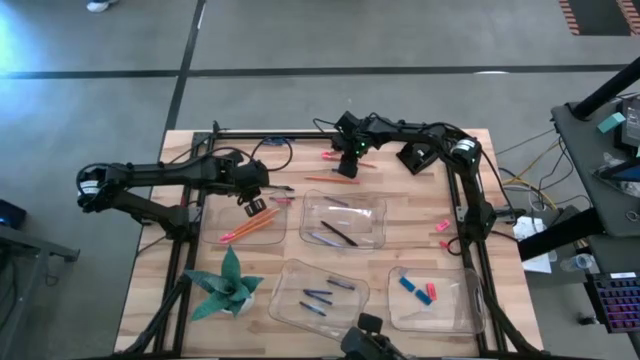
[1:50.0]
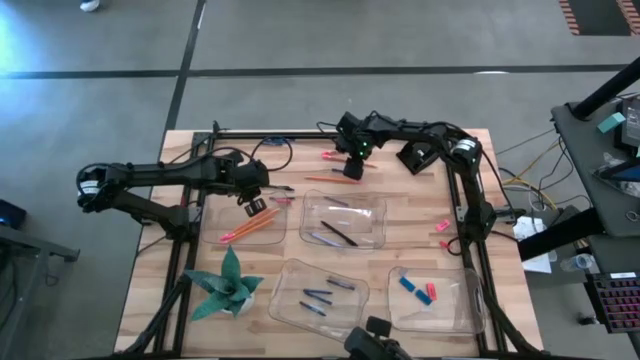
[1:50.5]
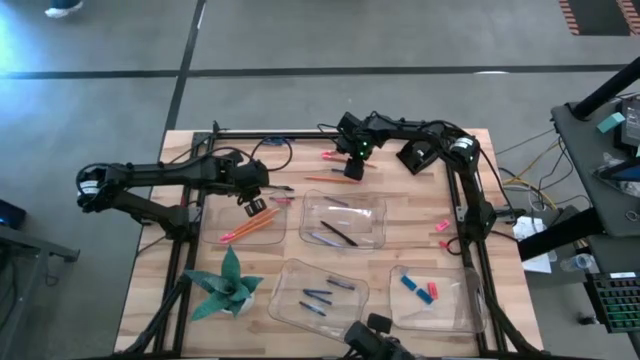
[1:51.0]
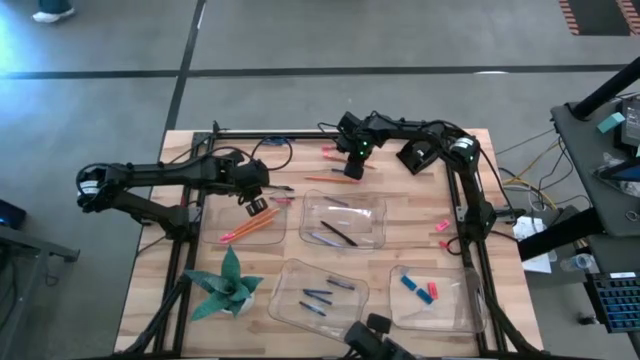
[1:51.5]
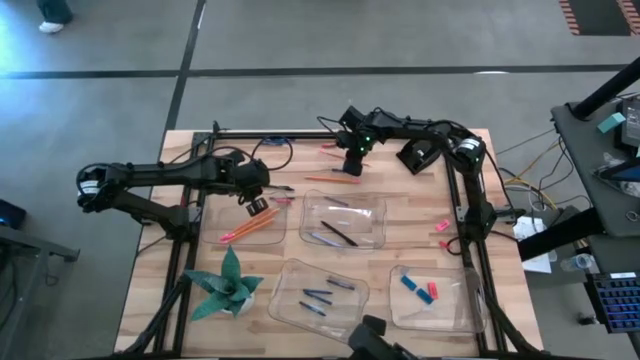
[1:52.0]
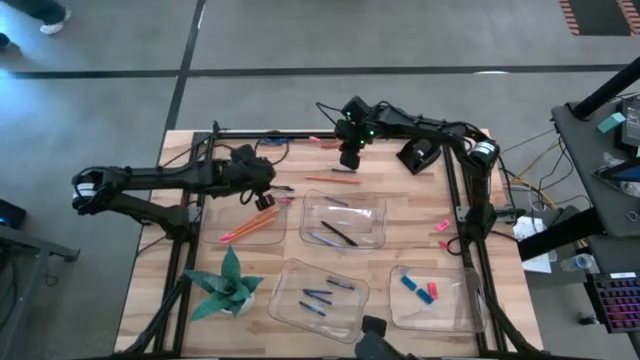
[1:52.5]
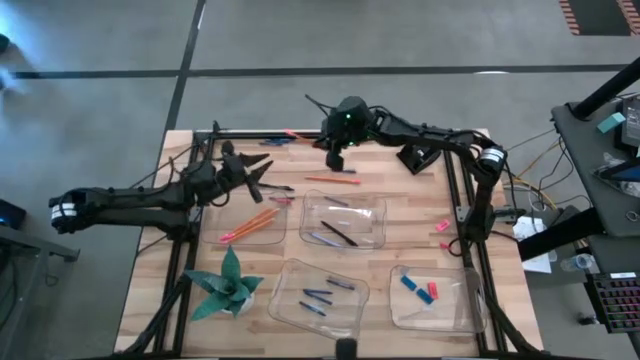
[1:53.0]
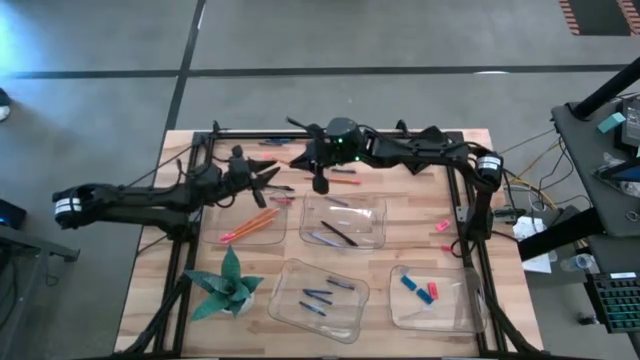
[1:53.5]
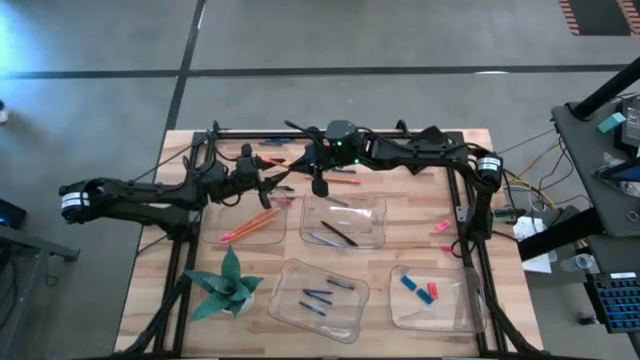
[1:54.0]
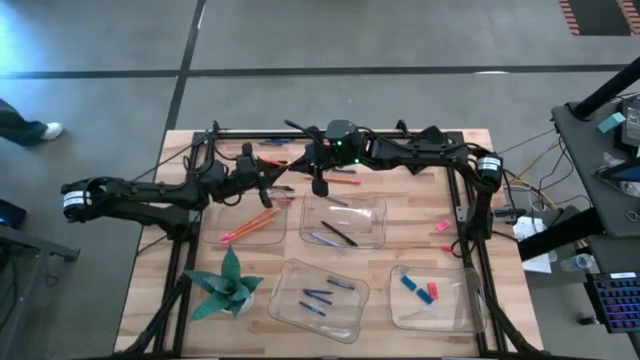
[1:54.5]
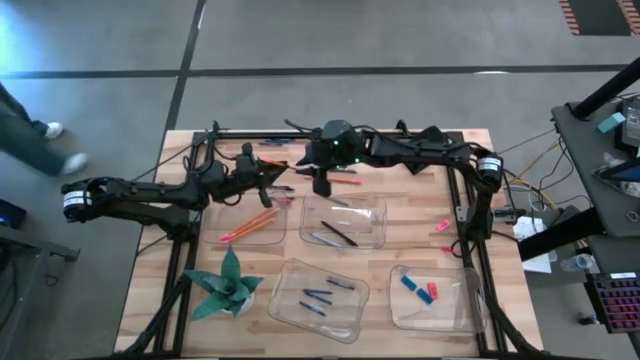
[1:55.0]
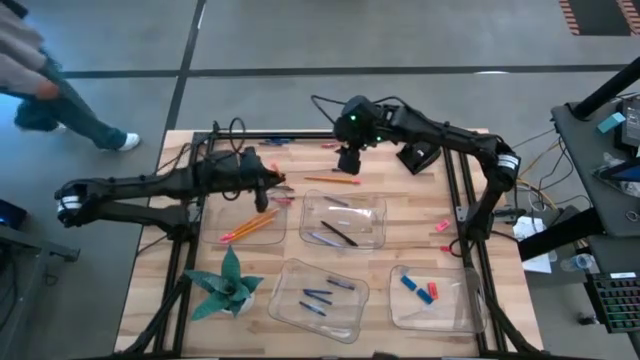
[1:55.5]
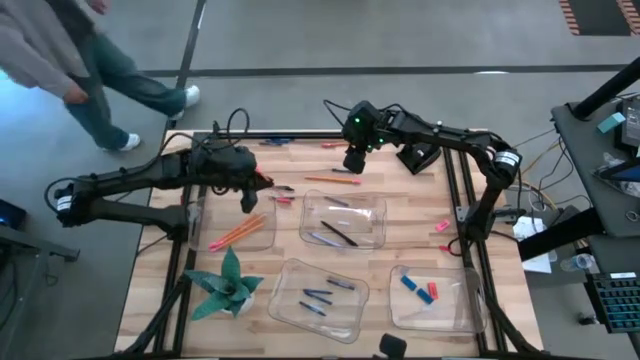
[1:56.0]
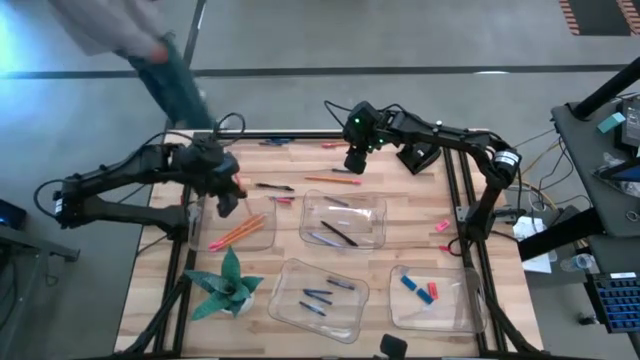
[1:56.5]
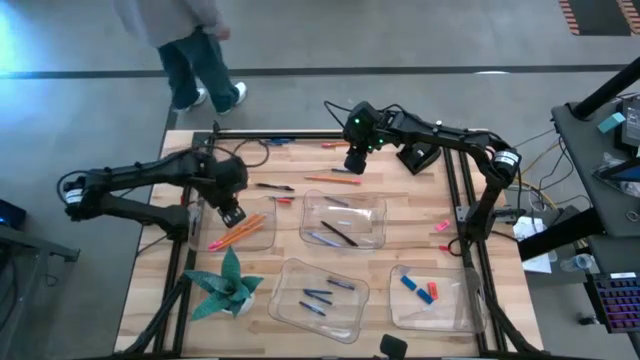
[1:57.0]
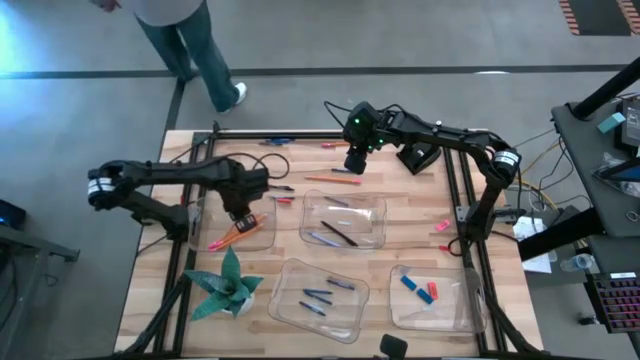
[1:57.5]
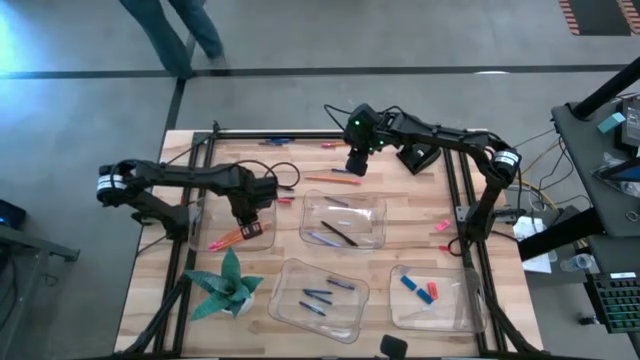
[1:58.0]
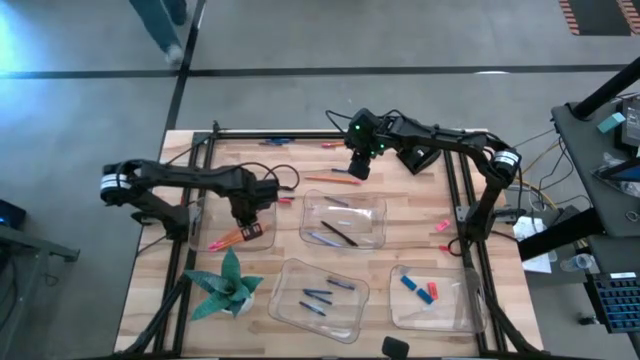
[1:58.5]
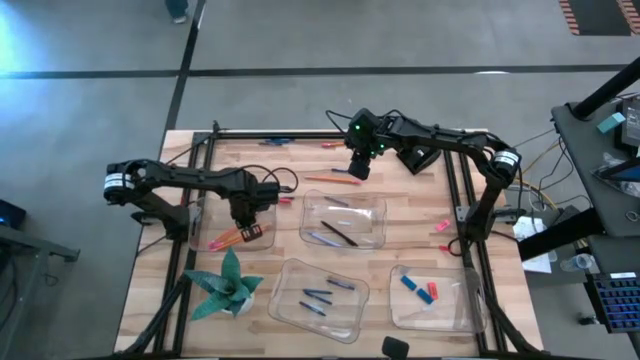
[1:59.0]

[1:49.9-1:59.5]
Task: Sort crayons/erasers/pens/pencils in bins
Put the orange pencil into the top left transparent bin

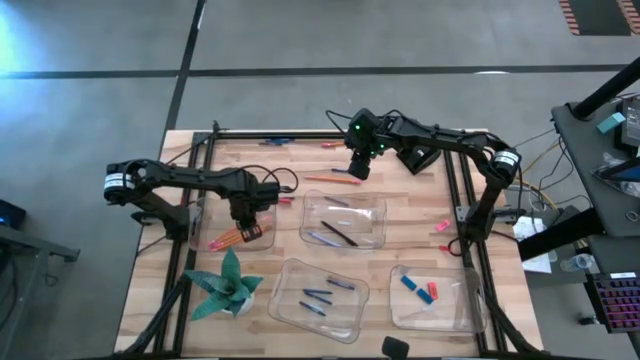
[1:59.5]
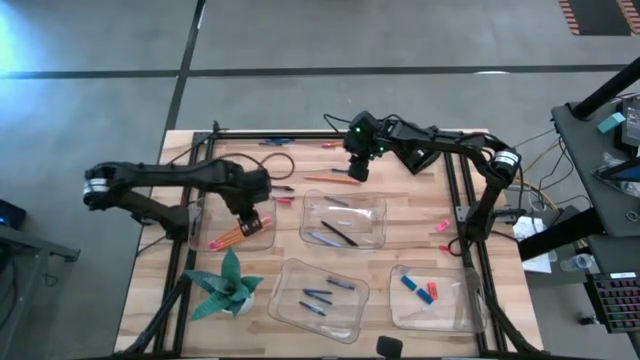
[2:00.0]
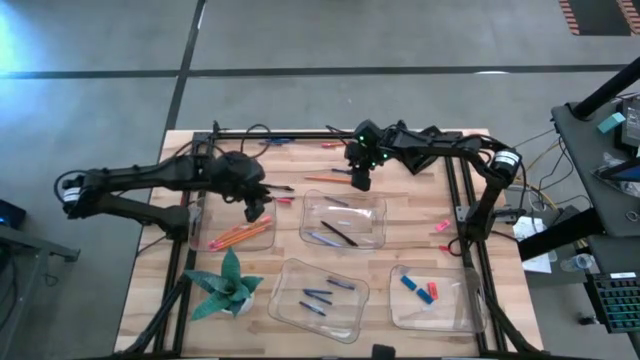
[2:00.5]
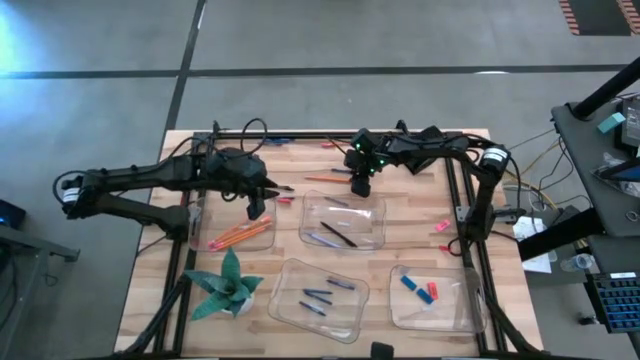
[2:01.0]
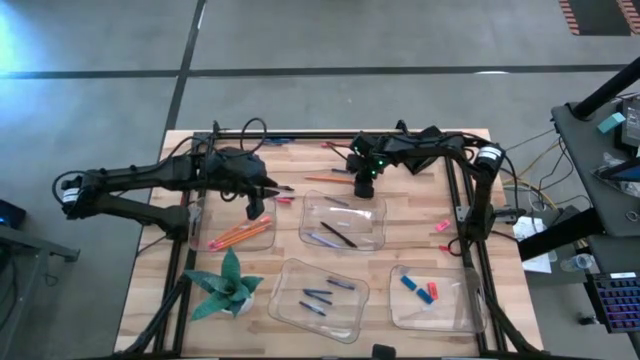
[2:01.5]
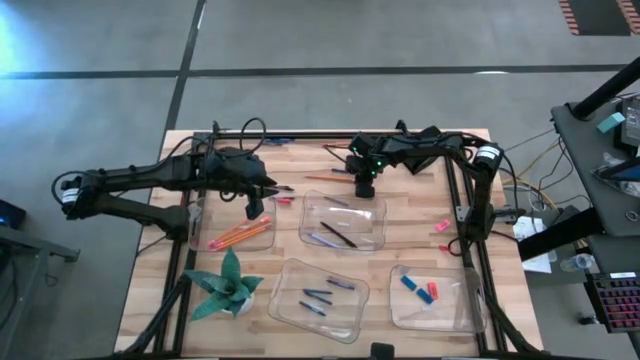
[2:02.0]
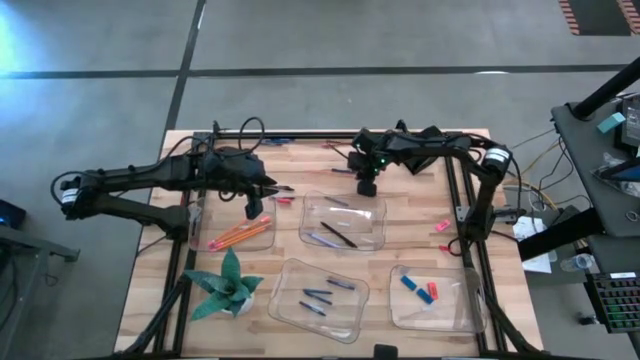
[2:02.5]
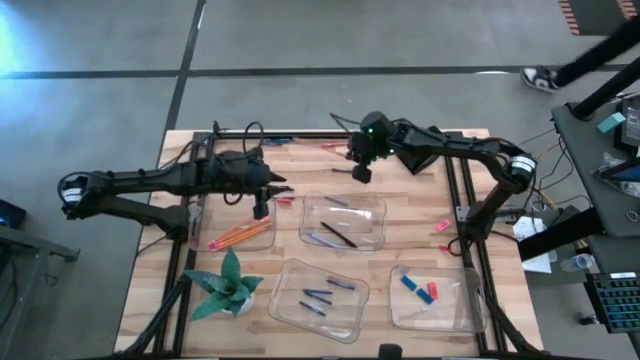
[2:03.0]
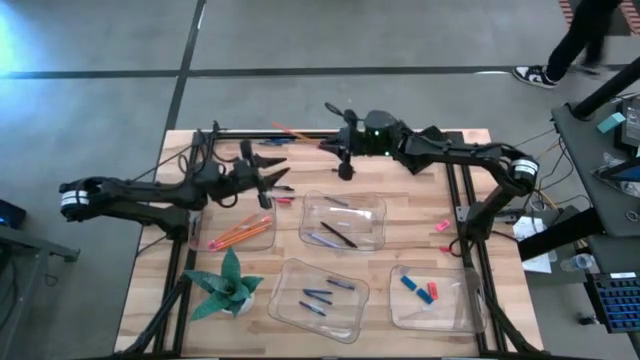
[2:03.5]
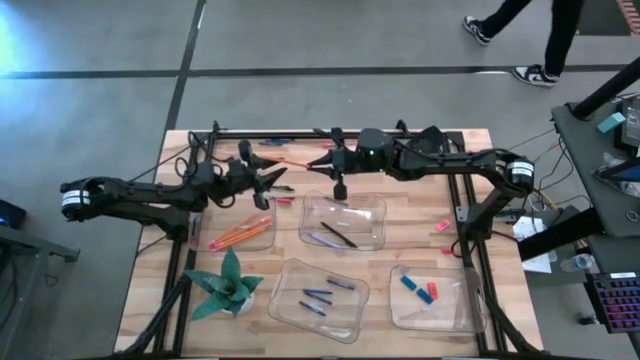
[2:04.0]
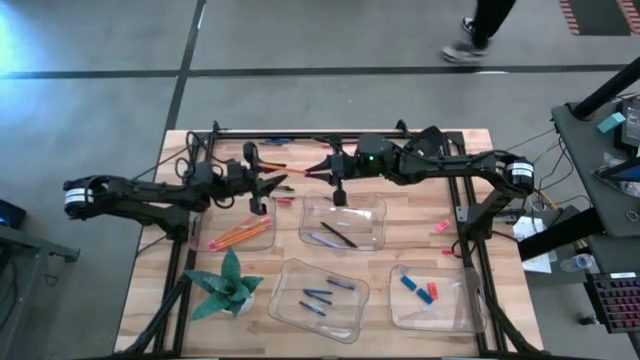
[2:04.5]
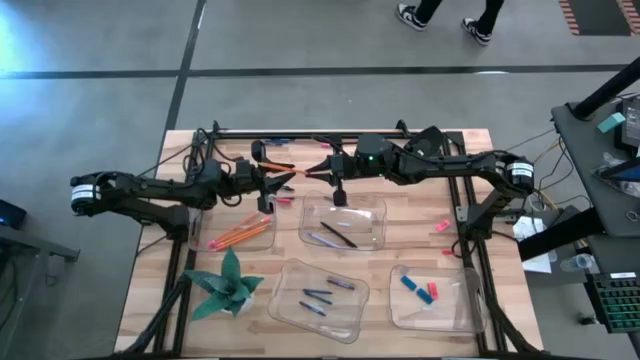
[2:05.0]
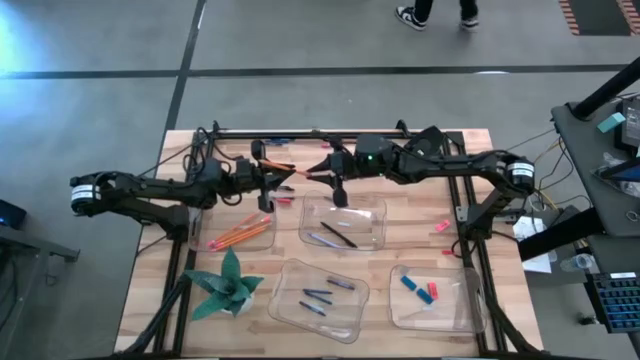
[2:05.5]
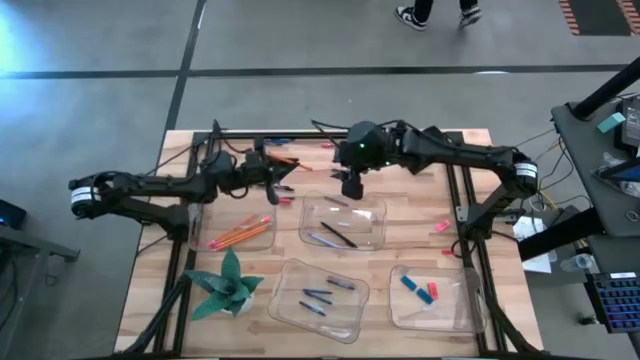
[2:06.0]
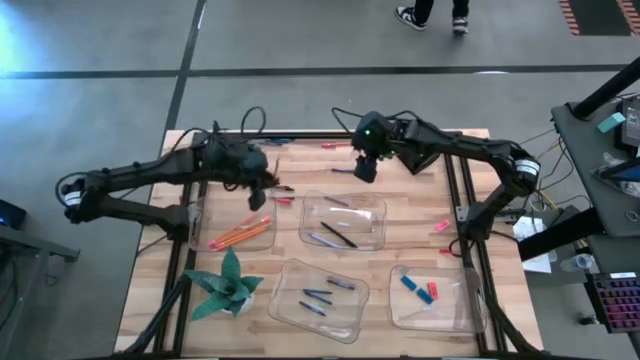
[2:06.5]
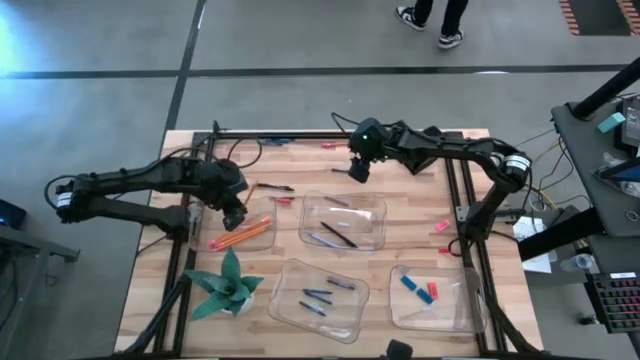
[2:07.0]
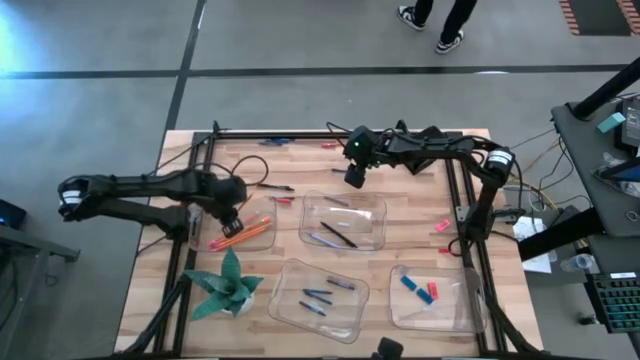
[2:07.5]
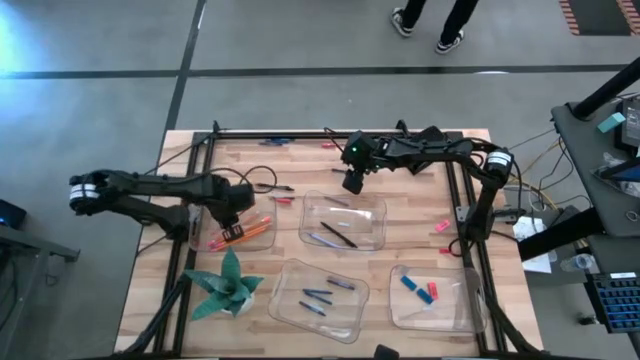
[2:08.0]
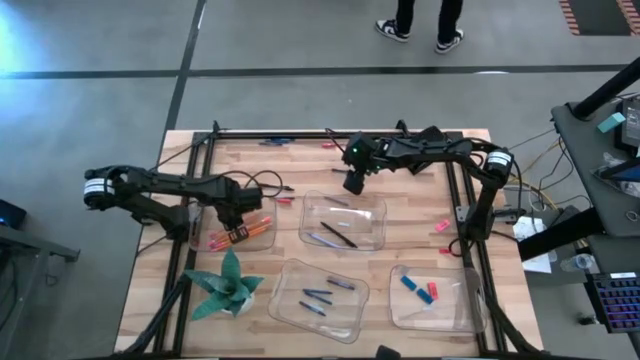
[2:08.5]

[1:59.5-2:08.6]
Put the orange pencil into the top left transparent bin

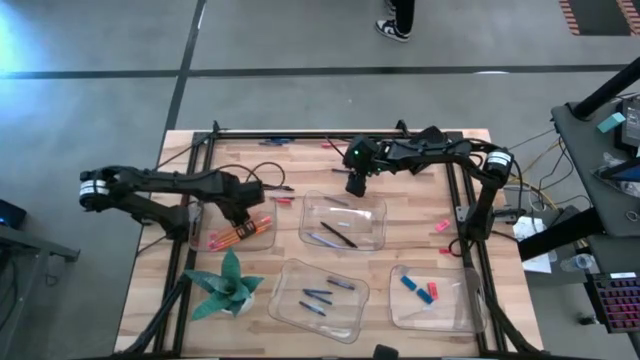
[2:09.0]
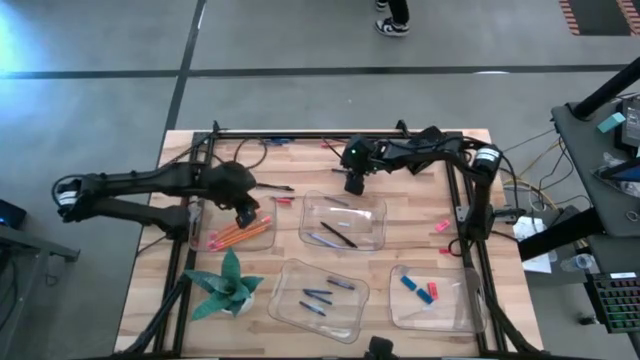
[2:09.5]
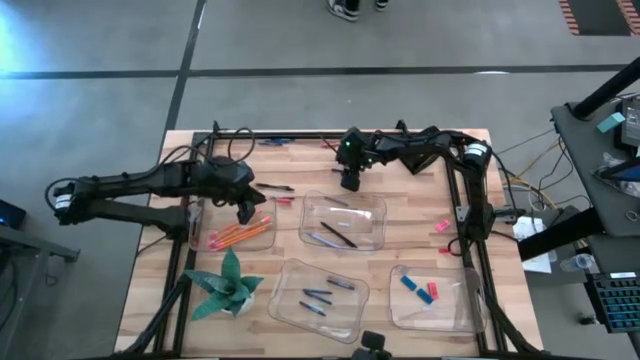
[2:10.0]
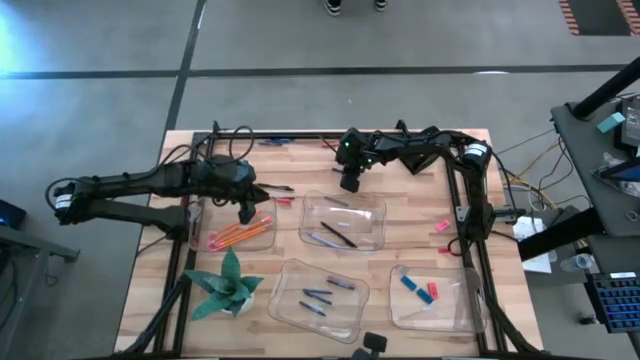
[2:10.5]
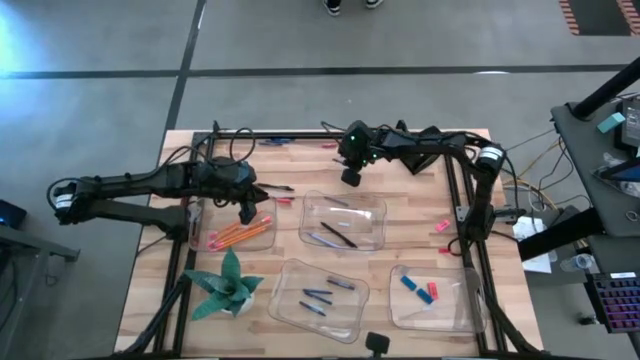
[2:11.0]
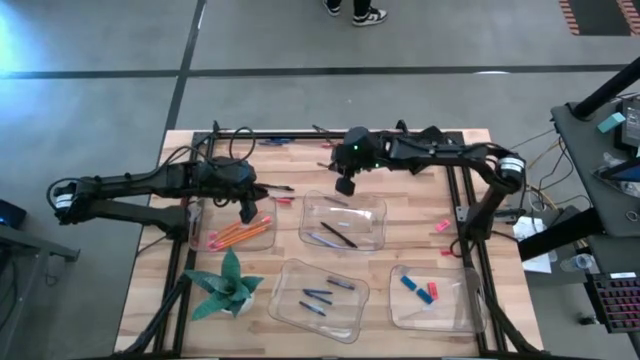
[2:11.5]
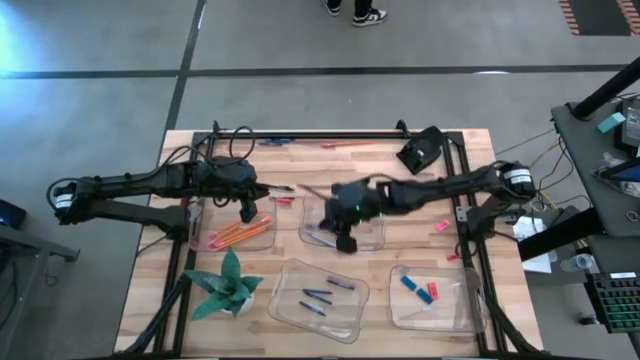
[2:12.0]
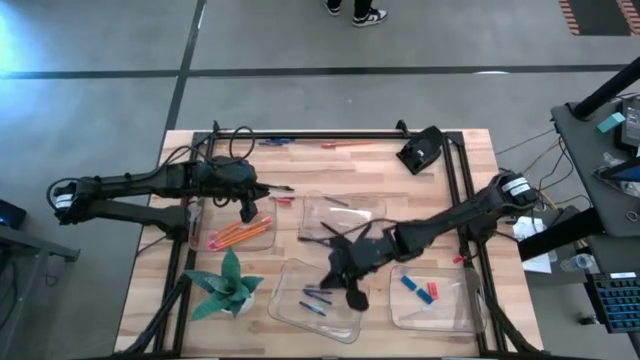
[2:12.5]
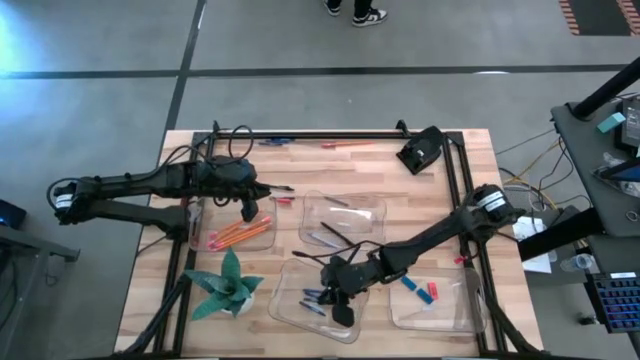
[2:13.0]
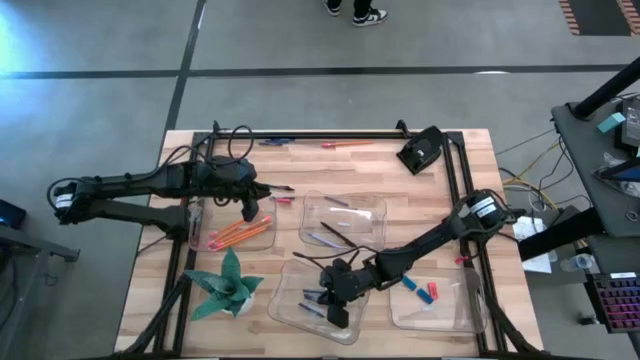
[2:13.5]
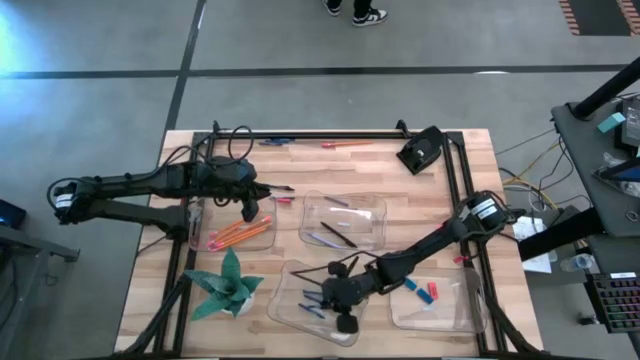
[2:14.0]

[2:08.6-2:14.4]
Put the blue crayon into the bottom left transparent bin
